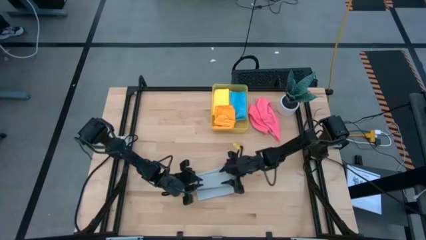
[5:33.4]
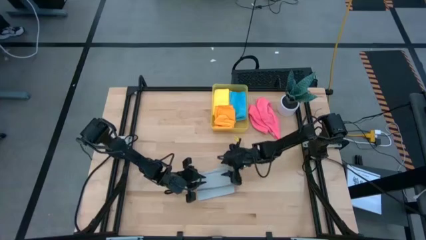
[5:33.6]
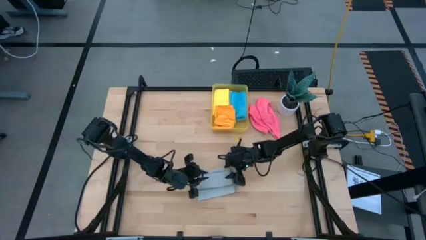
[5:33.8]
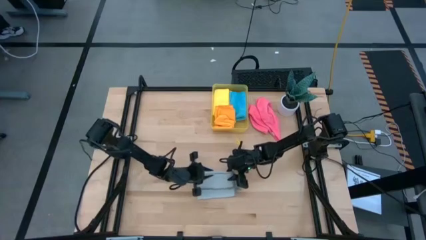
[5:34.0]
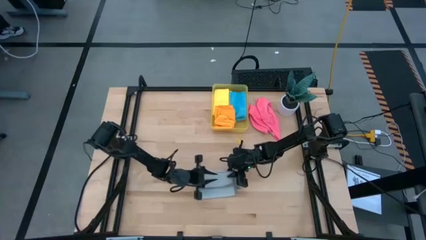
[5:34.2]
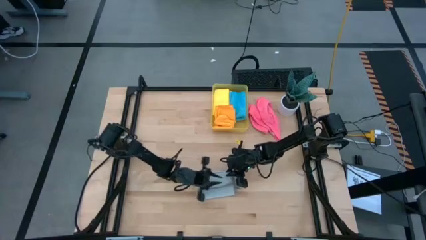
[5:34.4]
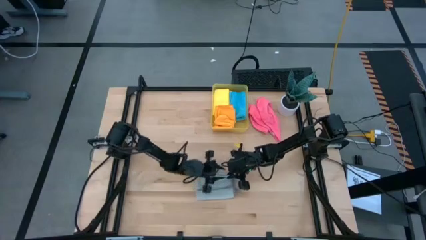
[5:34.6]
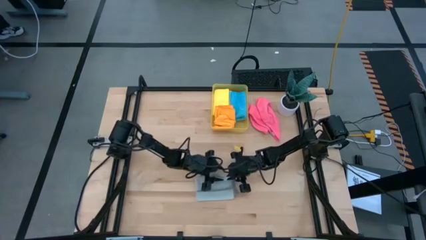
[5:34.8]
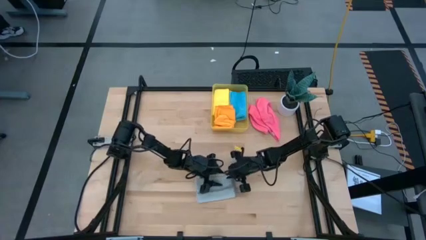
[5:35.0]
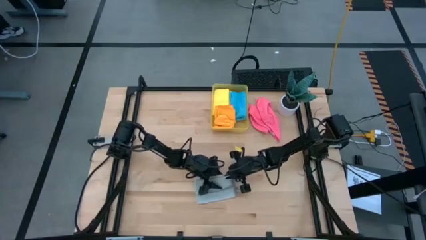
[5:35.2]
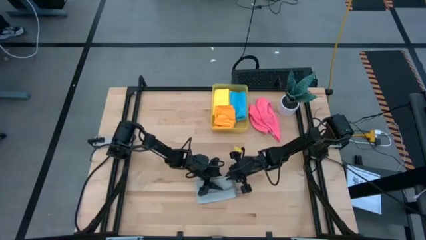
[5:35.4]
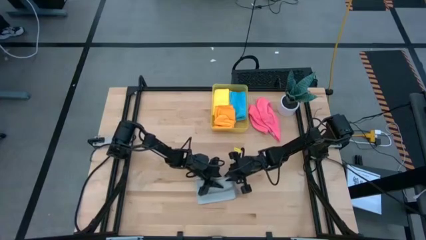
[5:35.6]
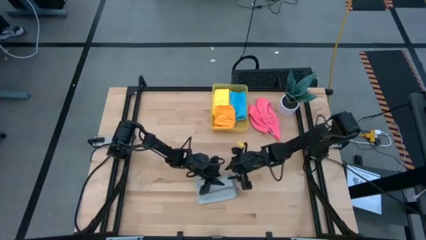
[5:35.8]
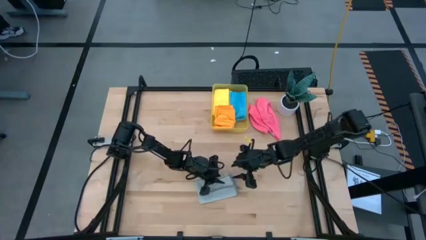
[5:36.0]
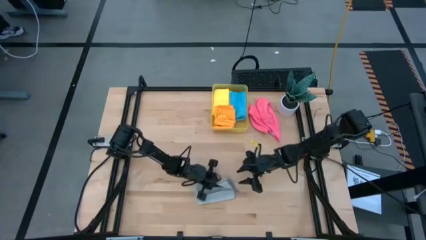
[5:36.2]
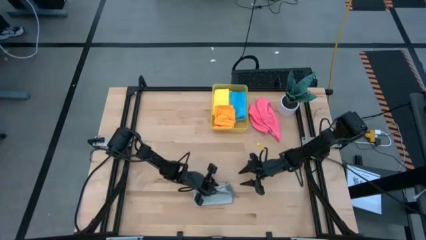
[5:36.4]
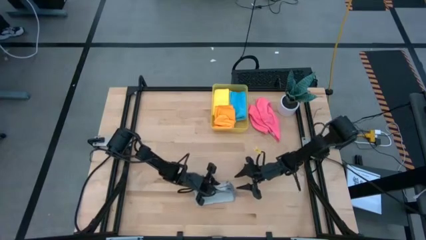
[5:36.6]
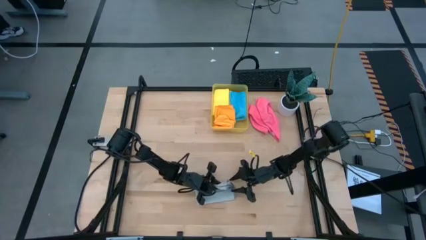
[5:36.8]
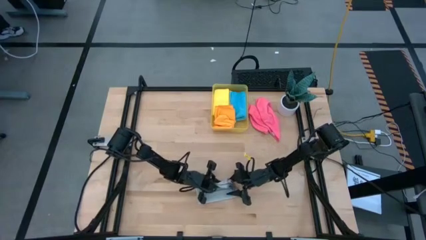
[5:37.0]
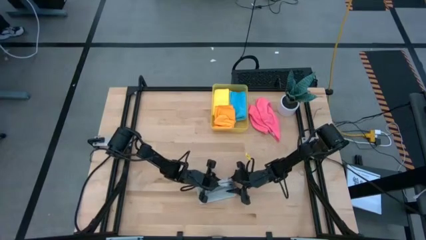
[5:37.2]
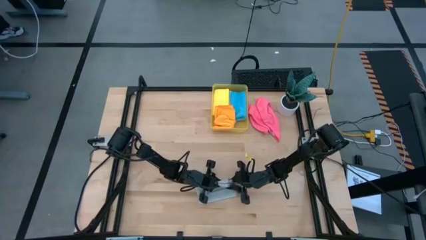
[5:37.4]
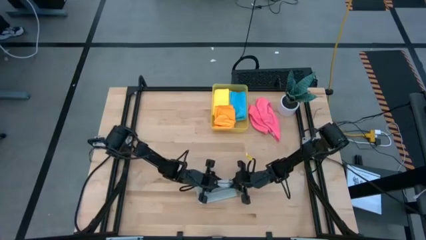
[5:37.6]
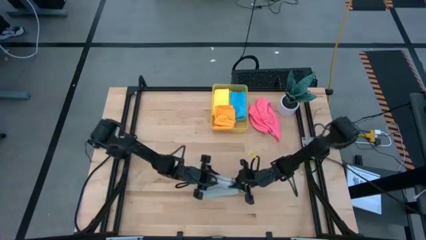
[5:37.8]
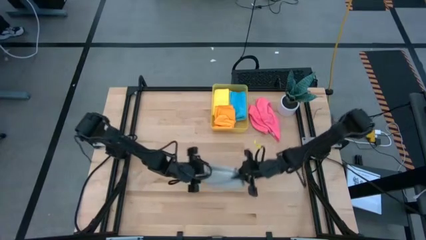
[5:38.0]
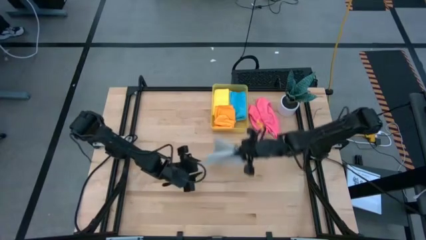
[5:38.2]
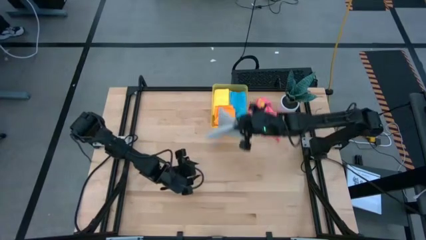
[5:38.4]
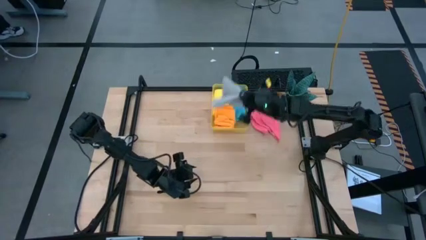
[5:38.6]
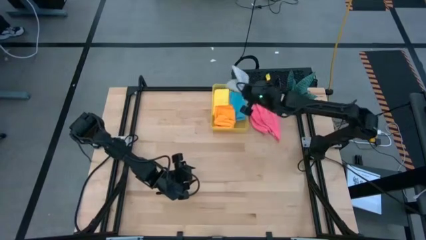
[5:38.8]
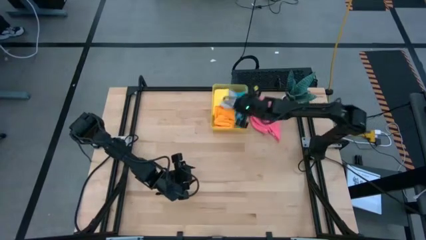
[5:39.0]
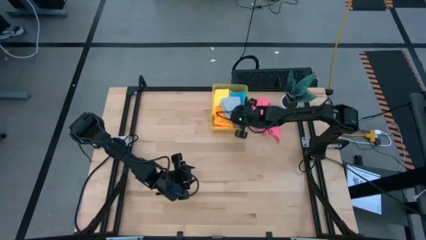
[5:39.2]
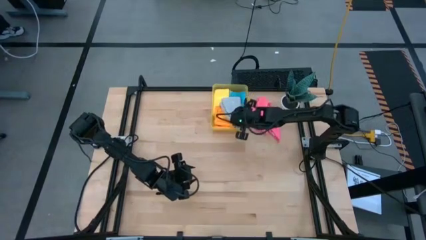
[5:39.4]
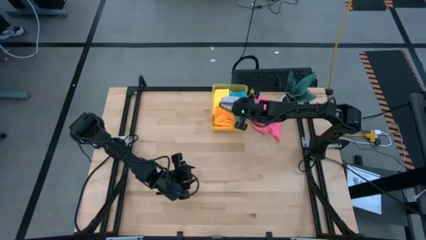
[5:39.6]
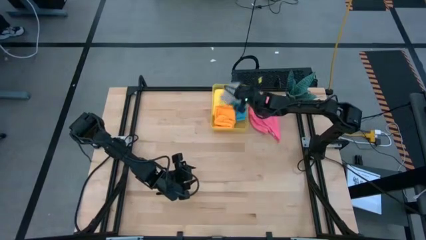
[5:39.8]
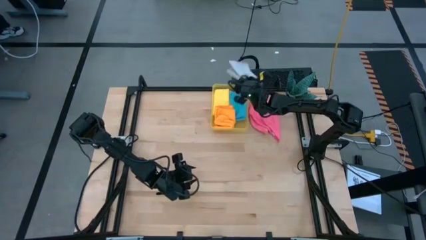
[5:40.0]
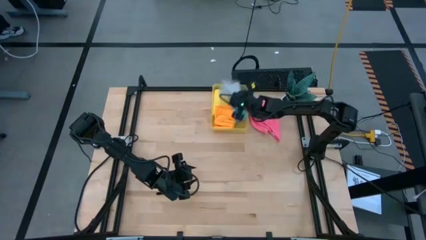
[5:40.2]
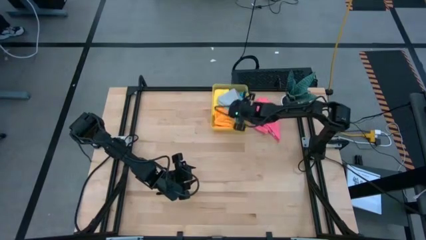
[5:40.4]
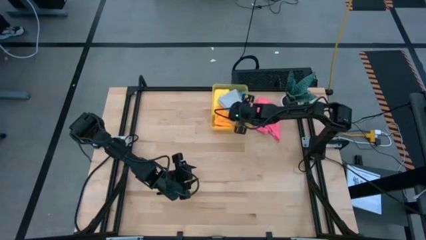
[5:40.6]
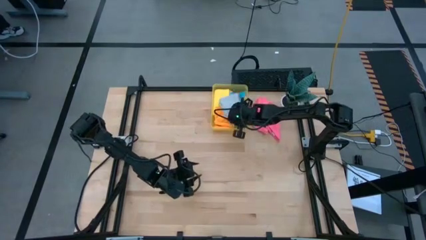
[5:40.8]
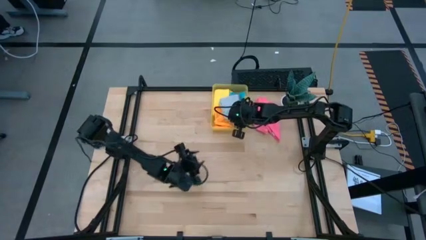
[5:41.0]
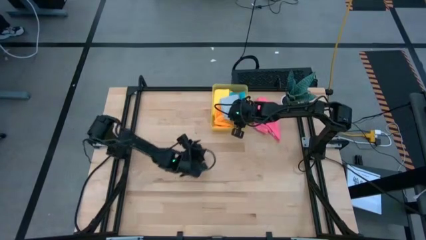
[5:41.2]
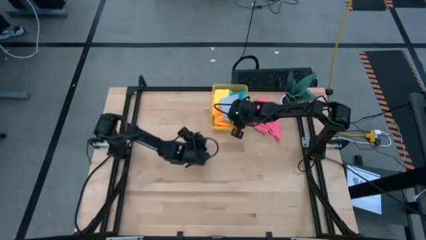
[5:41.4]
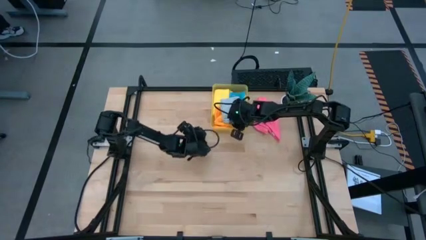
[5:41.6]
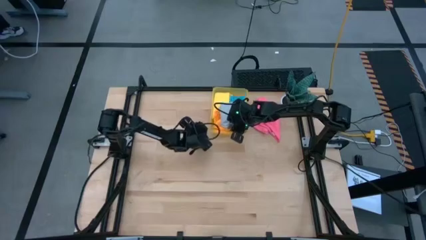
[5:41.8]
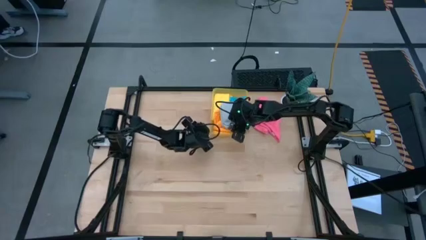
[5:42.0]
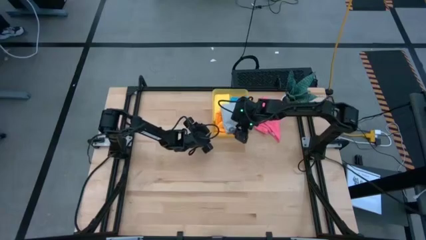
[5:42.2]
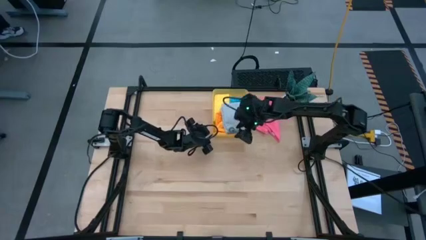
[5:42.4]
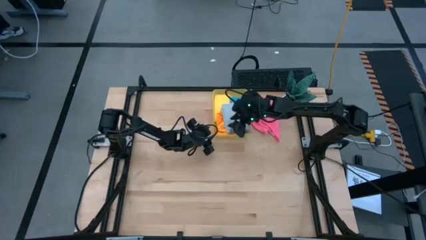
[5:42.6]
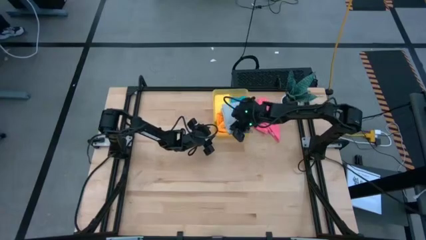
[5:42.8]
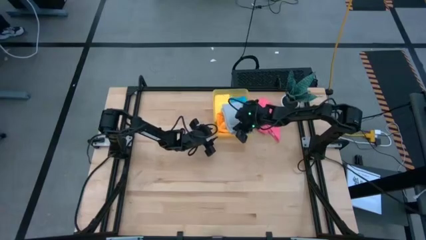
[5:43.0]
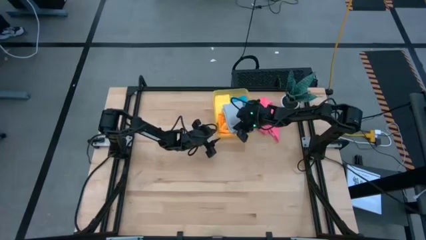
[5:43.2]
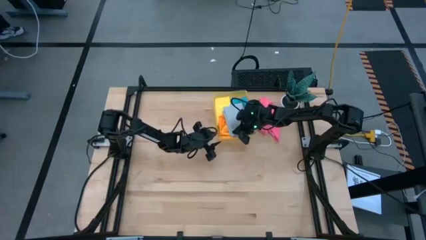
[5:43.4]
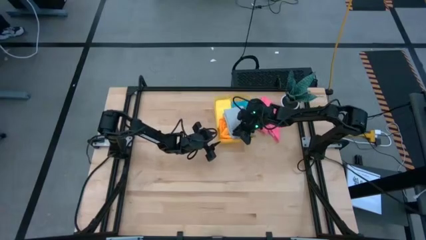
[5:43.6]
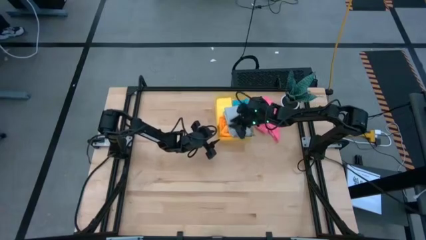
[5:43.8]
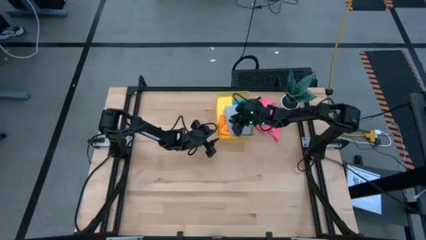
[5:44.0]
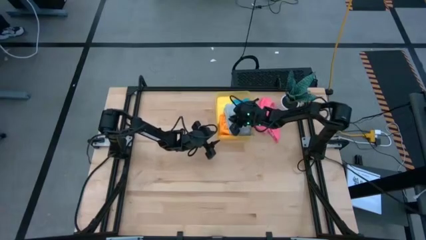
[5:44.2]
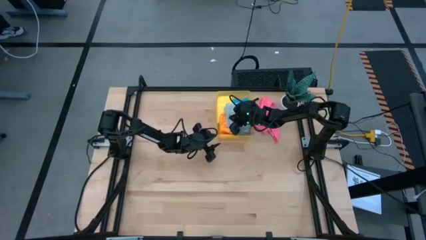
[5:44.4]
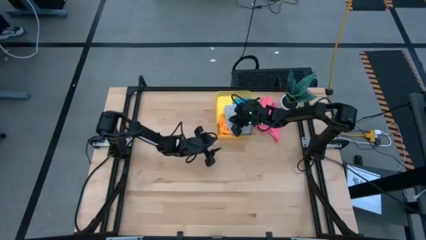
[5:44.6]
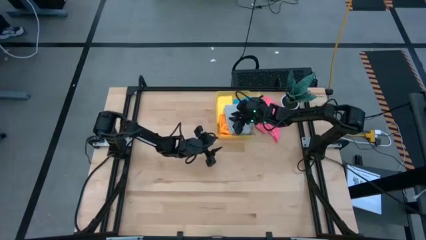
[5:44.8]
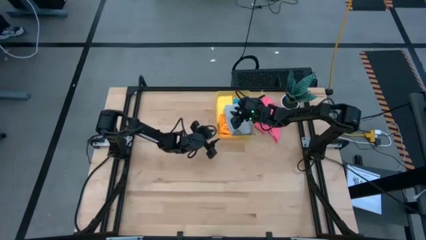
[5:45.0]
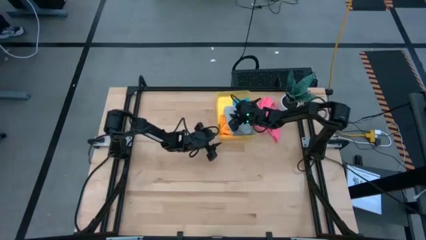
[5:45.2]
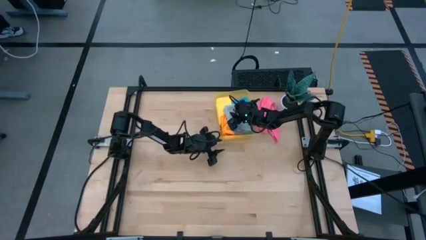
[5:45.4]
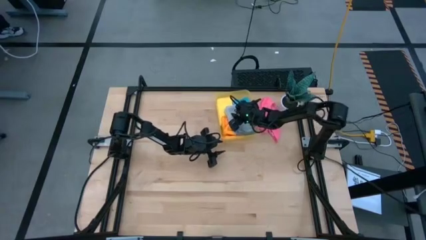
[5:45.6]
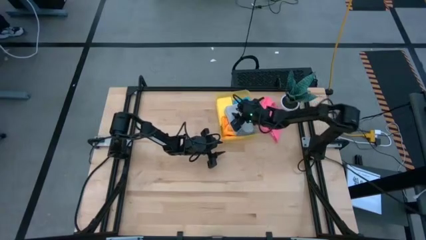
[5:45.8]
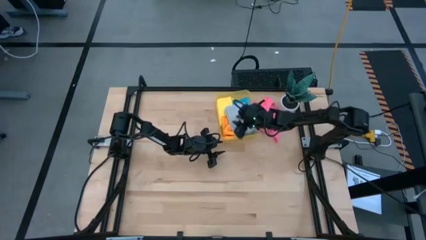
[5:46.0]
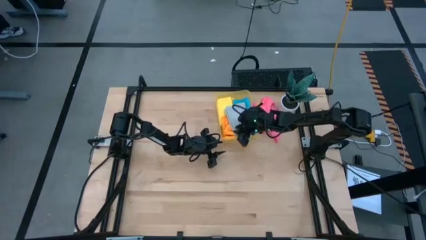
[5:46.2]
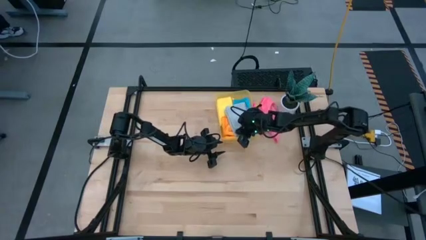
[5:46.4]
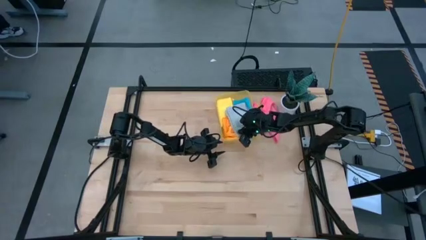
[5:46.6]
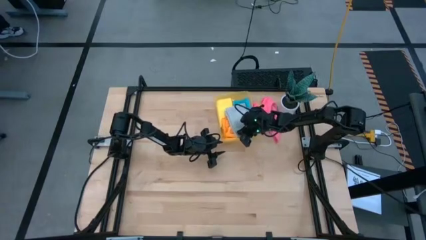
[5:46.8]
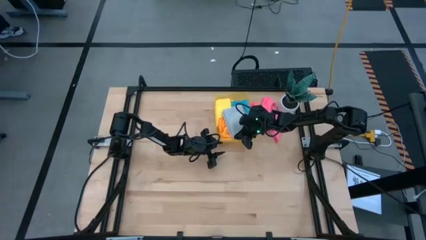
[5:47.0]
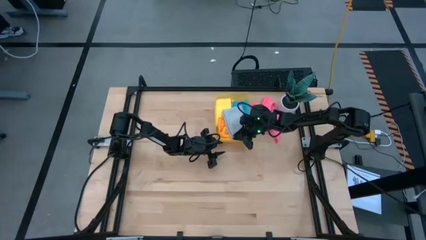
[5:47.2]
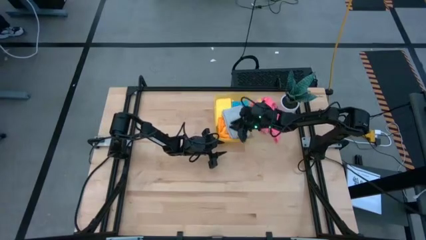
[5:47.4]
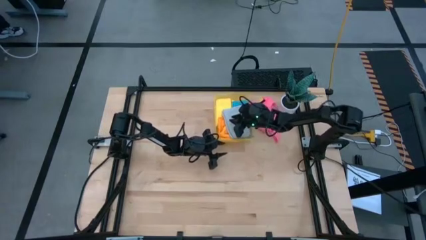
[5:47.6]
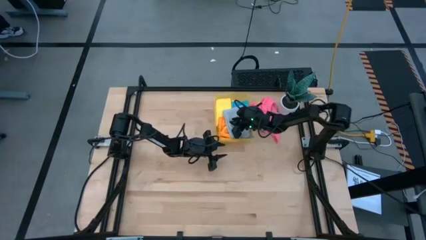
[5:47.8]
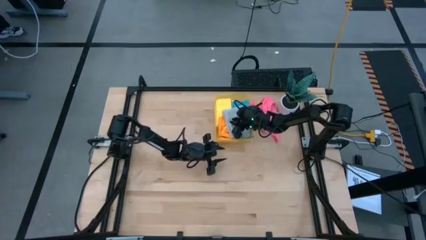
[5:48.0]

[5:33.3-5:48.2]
Task: Fold microfiber towels
Put the folded gray microfiber towel into the yellow bin

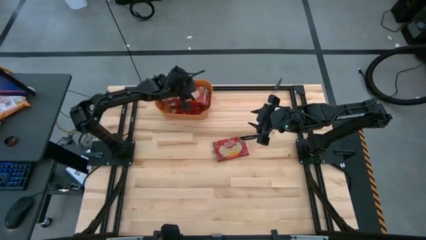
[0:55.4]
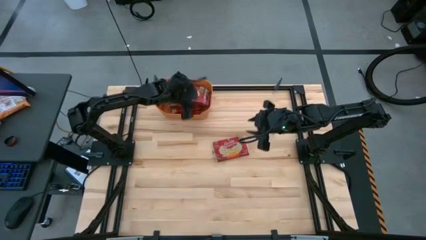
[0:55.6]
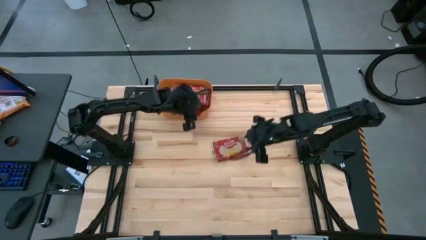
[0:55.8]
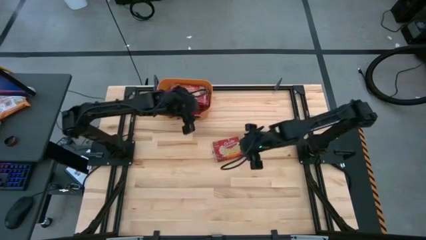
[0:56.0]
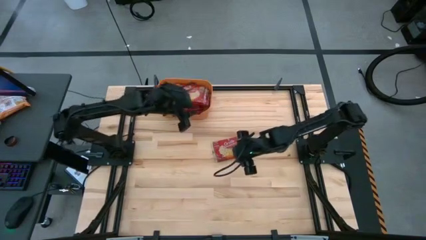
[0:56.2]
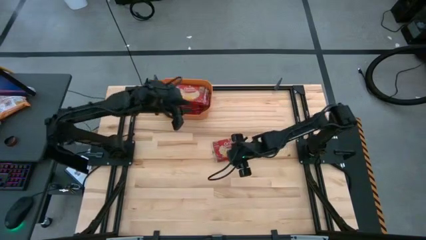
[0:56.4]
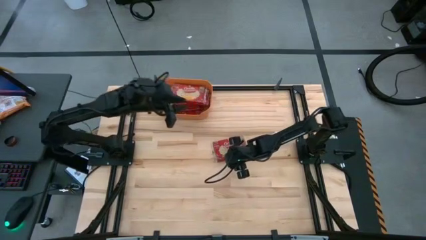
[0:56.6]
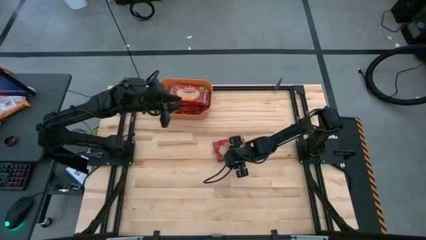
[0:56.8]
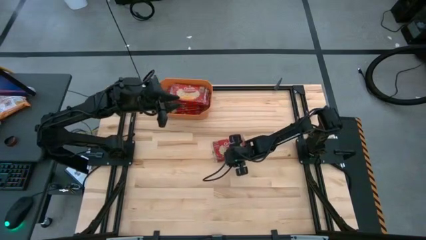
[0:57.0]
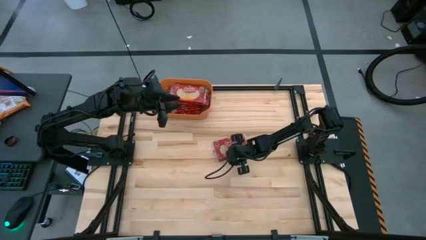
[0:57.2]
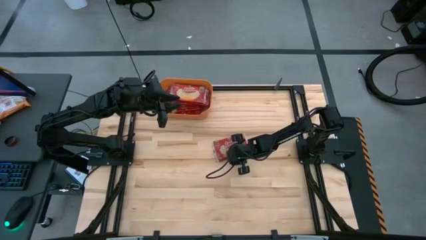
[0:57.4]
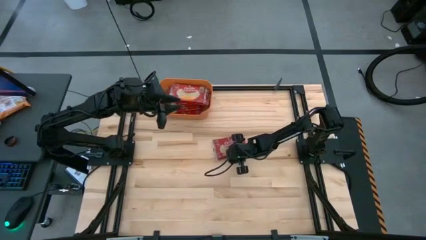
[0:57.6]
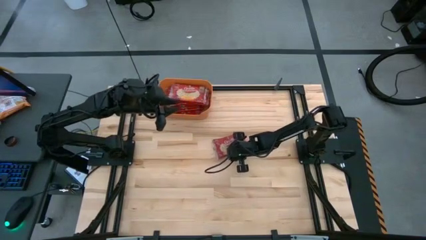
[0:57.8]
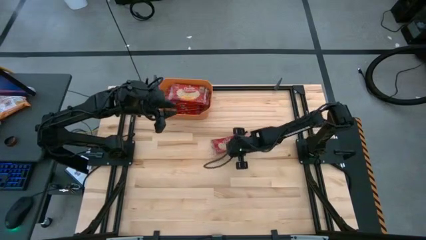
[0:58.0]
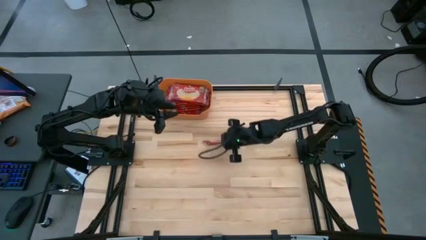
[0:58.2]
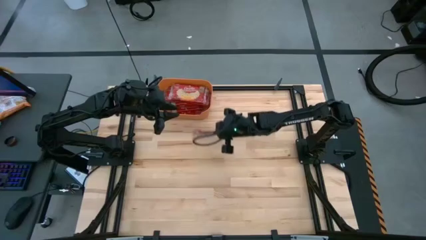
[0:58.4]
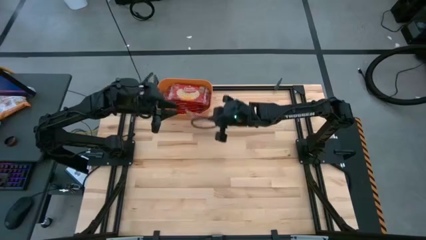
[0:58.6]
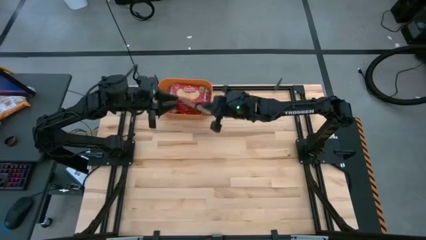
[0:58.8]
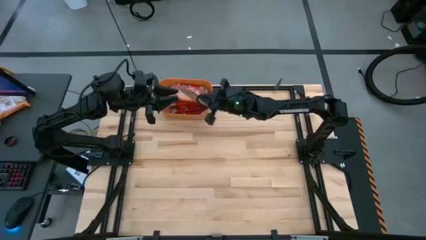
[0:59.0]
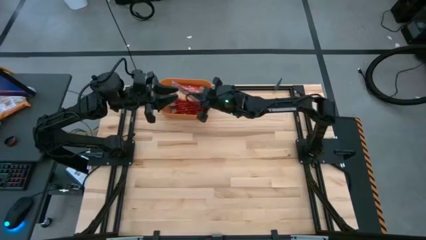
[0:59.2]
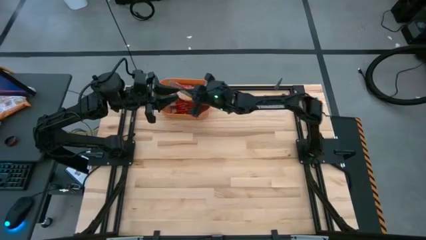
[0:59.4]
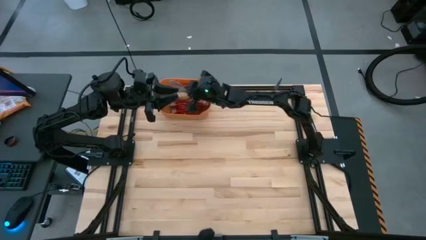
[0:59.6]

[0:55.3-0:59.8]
Task: Sort popcorn bags into baskets
Put the red popcorn bag into the orange bin
